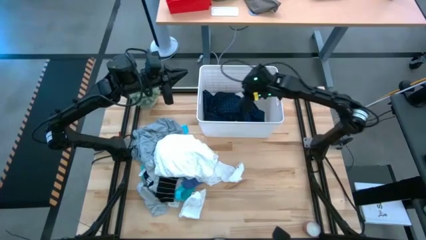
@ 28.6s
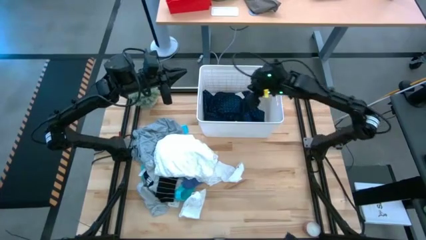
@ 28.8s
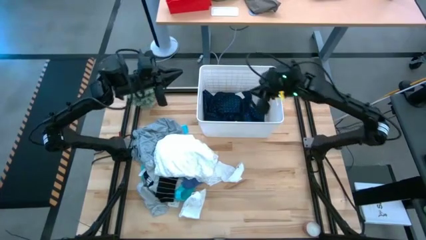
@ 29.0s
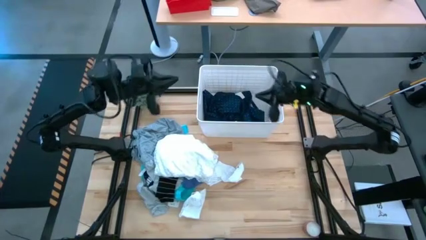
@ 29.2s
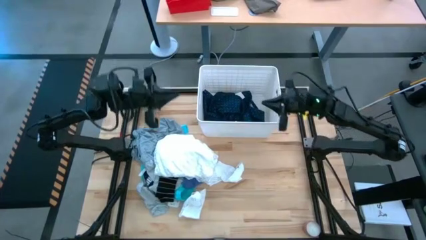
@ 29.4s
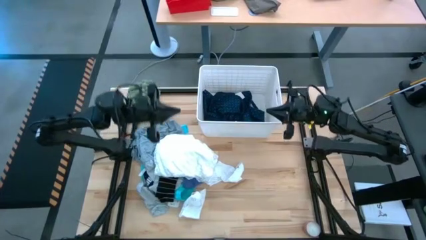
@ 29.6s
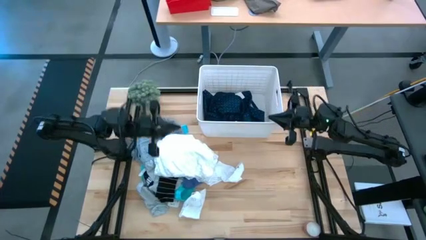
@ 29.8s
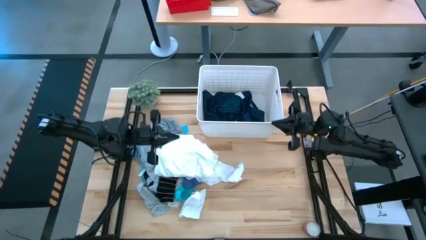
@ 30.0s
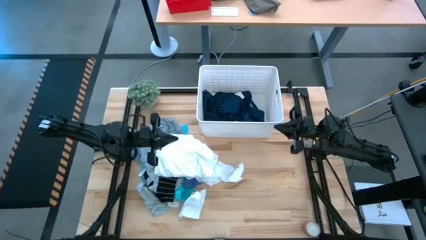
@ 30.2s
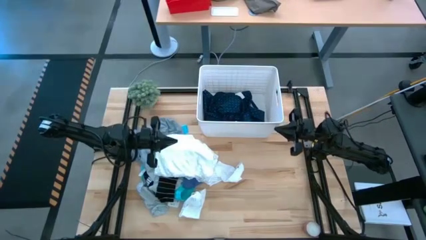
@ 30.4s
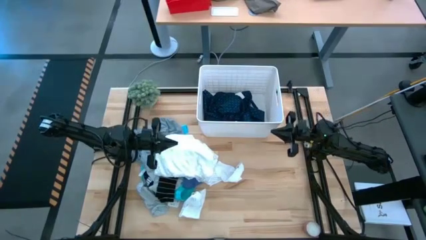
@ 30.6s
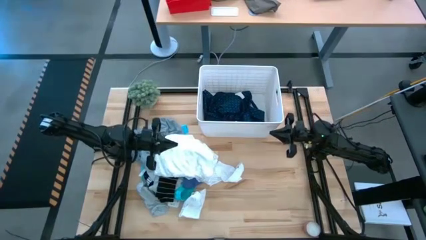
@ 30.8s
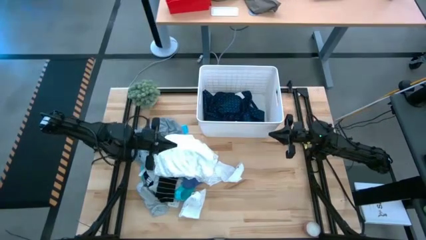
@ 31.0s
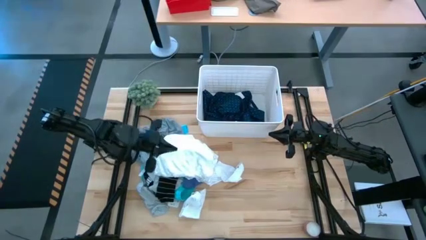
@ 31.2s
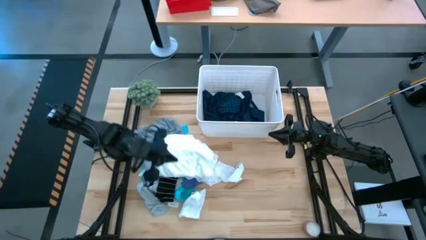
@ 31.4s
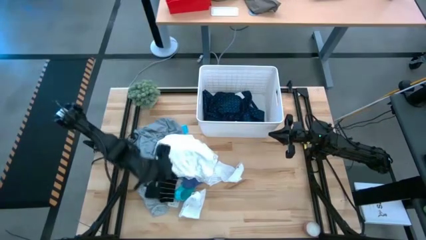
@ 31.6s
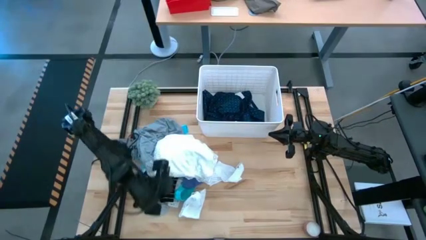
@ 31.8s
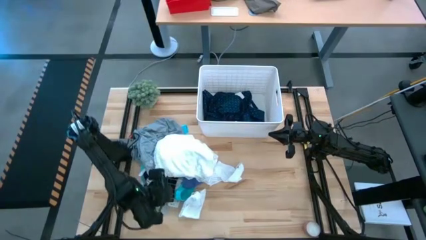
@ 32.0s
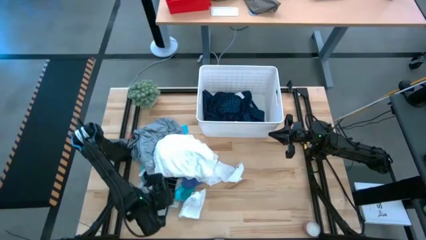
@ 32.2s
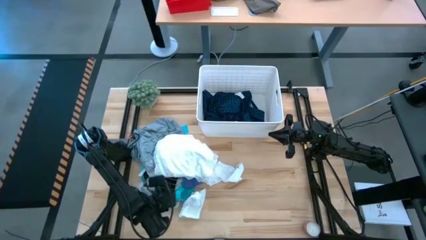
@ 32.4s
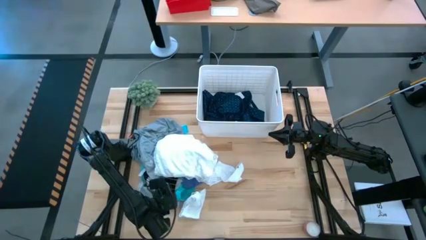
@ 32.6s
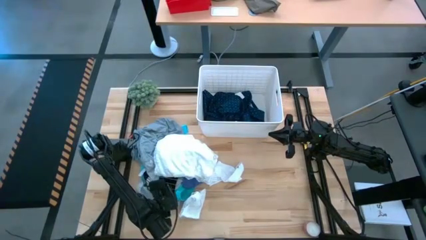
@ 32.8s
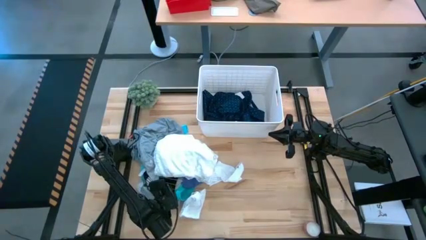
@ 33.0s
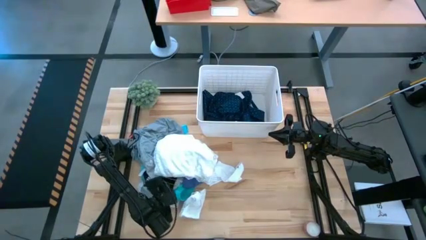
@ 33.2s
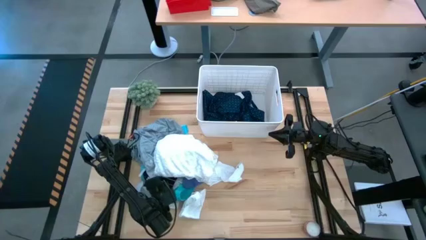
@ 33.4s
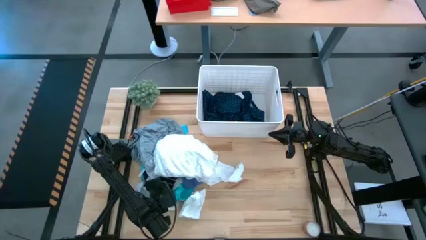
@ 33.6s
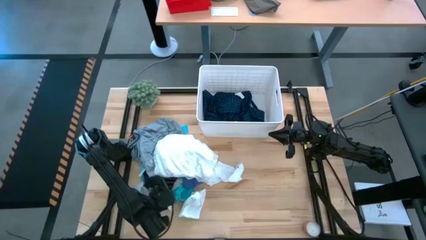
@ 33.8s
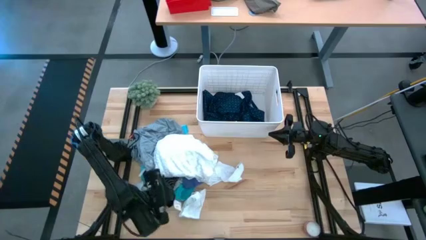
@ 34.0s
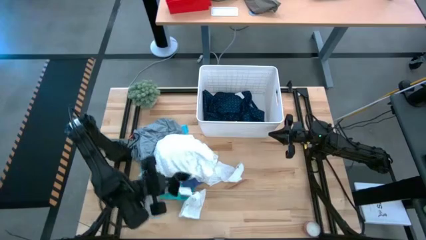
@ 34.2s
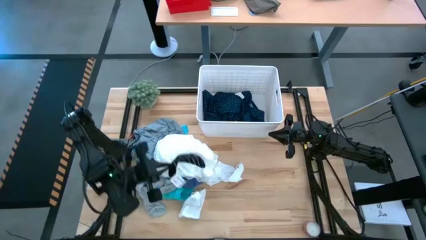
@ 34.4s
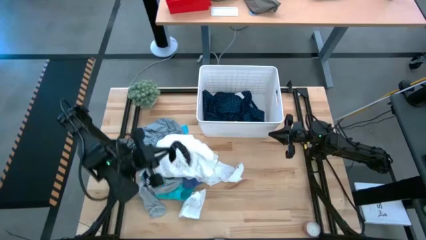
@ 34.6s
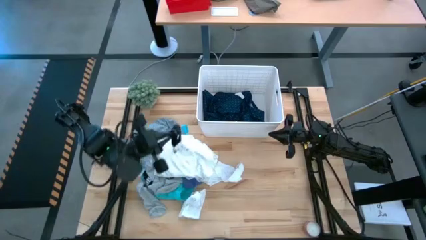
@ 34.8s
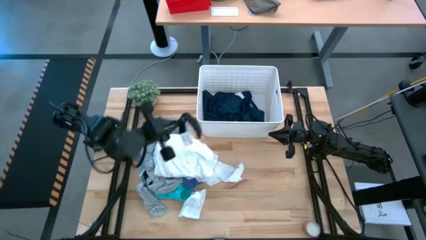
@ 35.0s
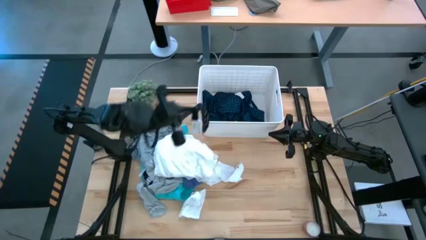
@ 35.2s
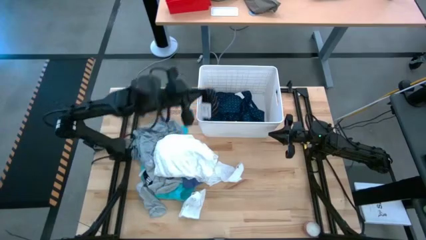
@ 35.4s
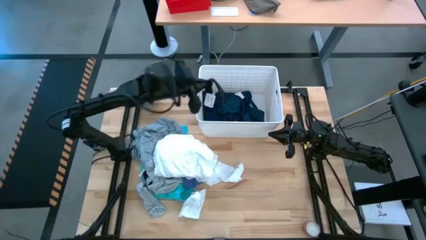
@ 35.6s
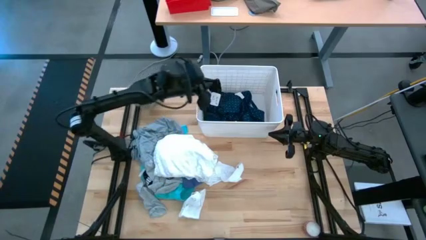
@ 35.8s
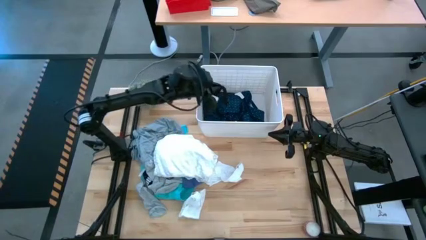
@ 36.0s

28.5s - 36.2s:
Task: Sort clothes
Put the black socks into the white bin

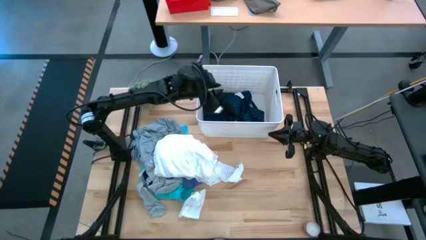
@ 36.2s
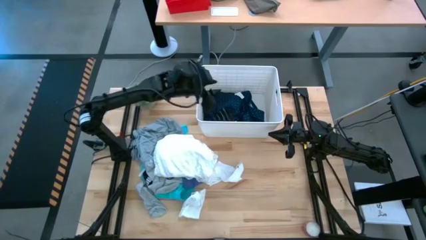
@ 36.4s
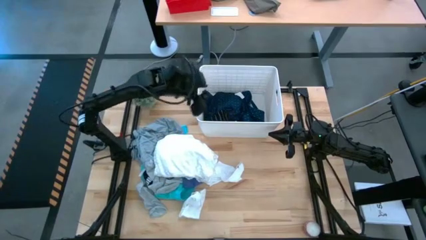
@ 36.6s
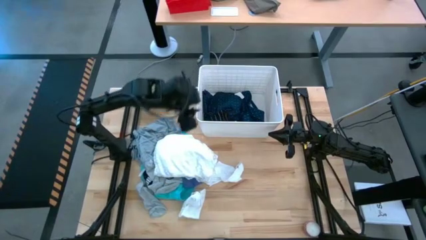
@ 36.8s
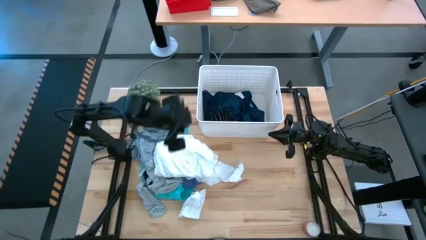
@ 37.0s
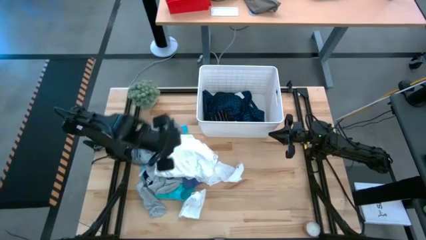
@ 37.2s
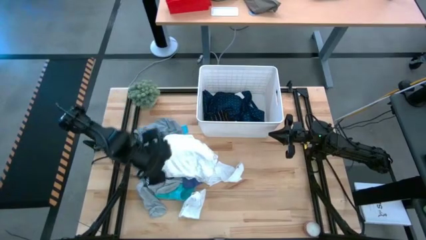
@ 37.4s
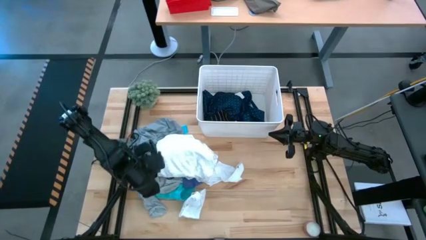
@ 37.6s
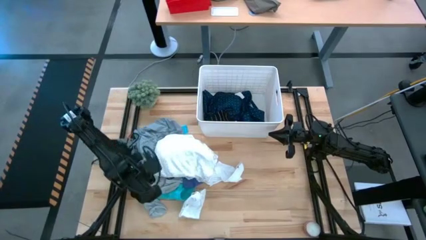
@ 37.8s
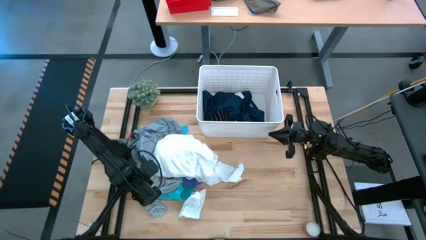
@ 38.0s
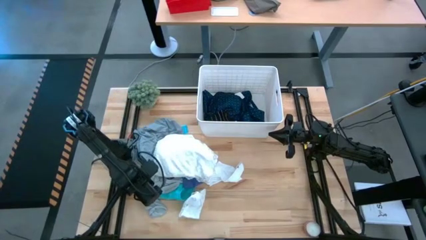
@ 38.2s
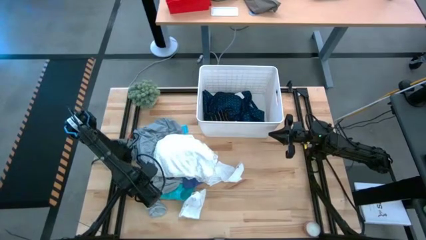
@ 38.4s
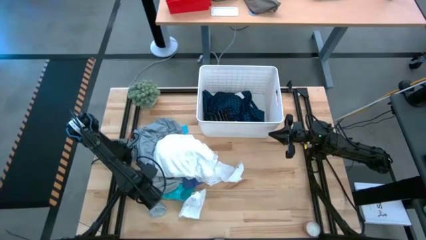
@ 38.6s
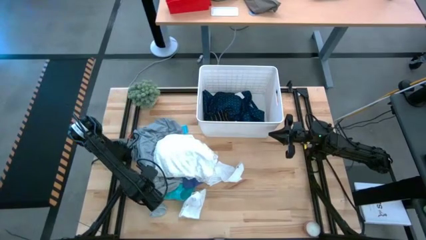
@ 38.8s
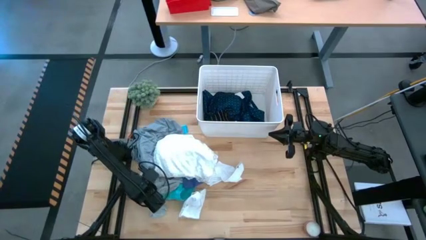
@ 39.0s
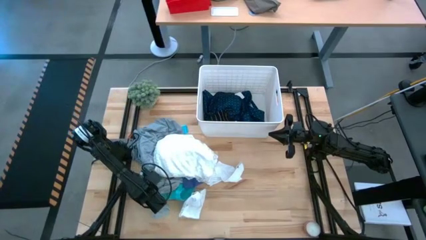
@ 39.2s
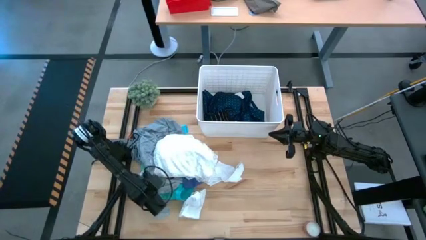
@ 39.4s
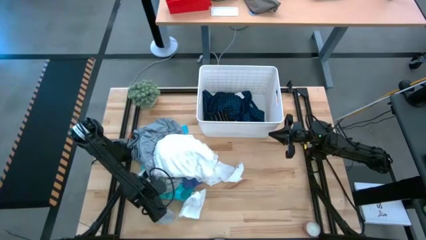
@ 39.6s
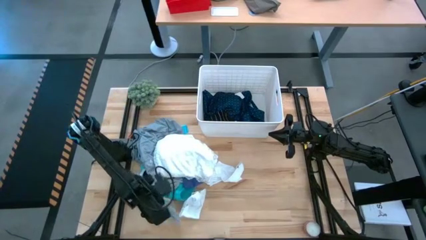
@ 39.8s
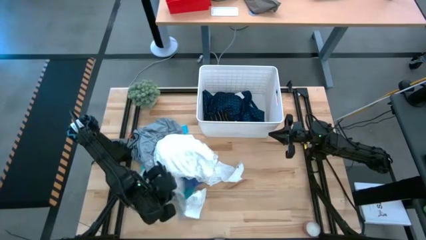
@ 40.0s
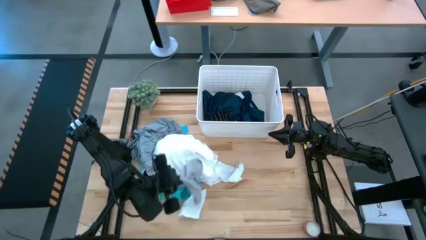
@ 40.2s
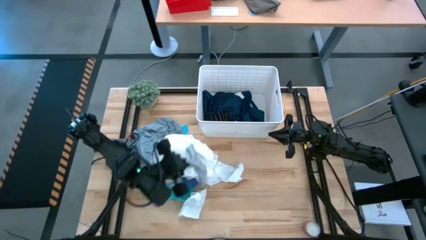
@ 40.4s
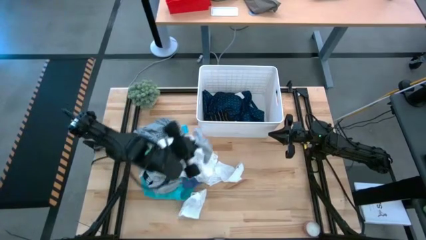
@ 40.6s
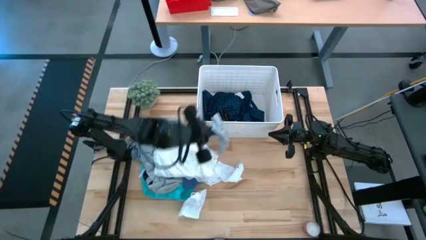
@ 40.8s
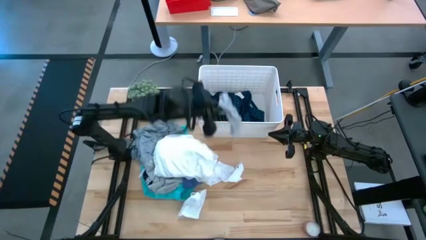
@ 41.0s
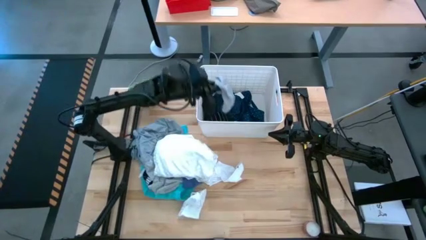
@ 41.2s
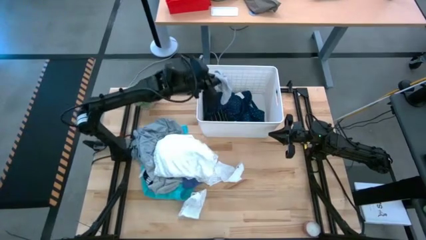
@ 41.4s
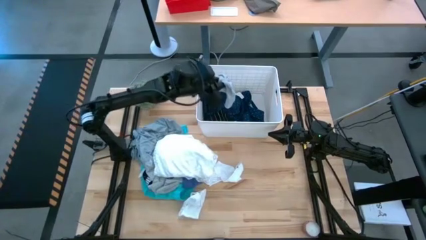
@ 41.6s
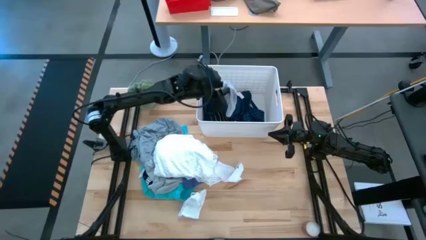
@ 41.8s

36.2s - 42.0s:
Put the gray socks into the white bin

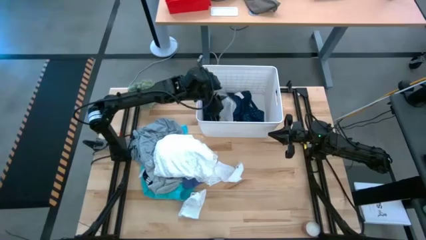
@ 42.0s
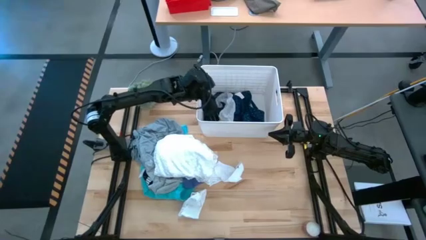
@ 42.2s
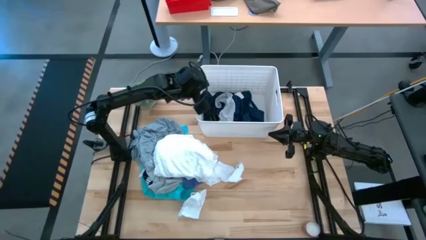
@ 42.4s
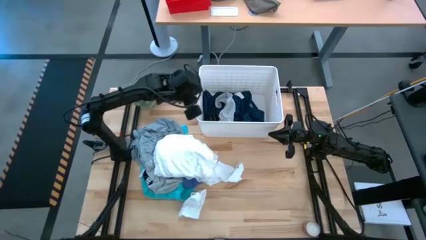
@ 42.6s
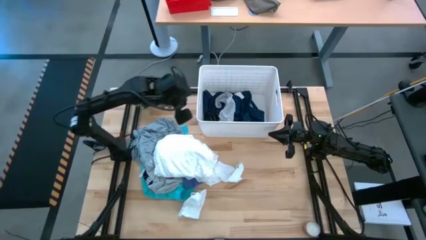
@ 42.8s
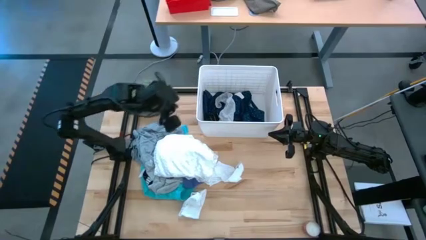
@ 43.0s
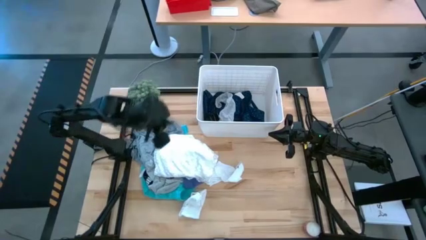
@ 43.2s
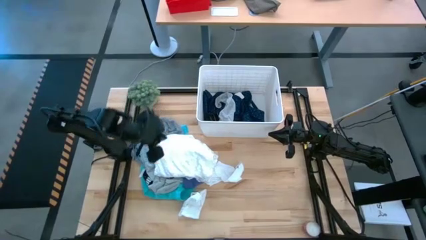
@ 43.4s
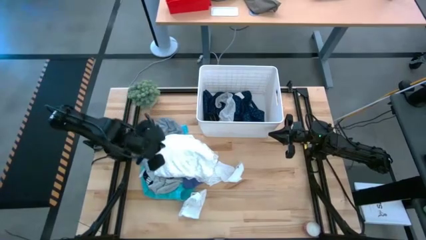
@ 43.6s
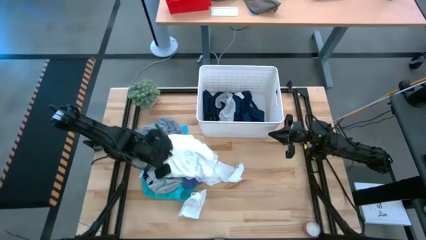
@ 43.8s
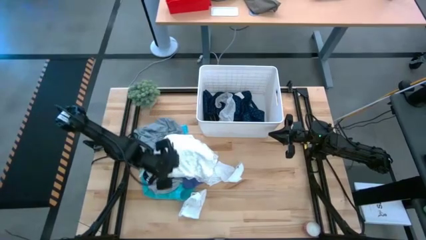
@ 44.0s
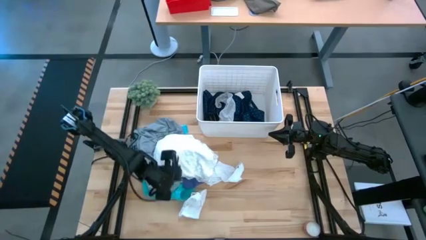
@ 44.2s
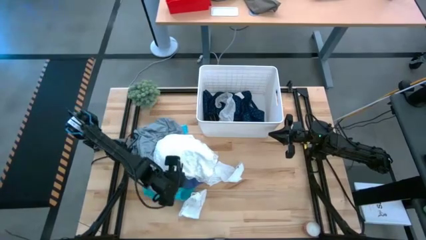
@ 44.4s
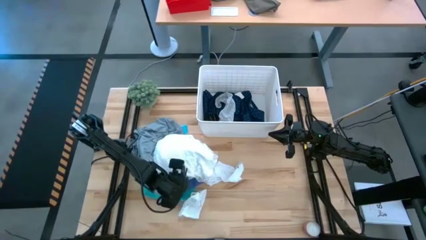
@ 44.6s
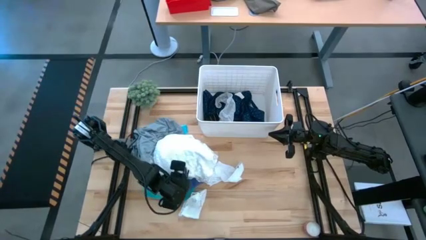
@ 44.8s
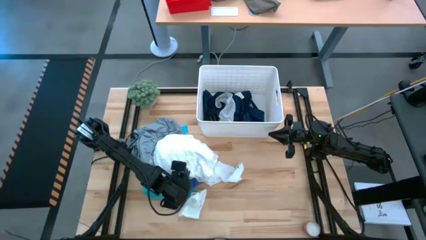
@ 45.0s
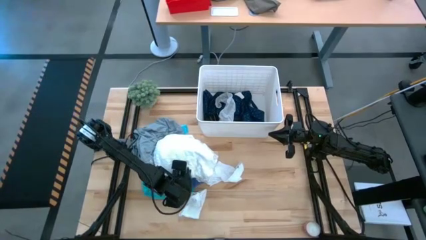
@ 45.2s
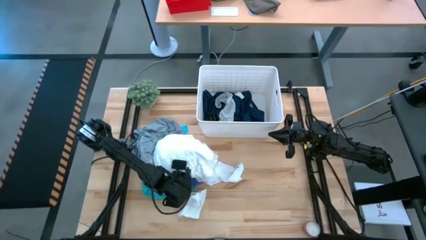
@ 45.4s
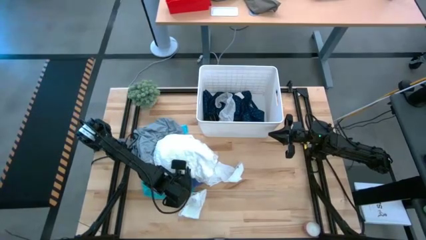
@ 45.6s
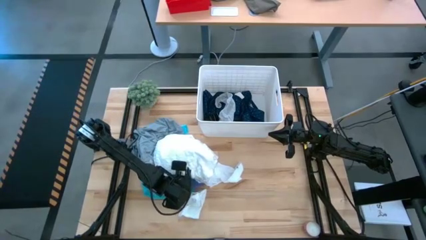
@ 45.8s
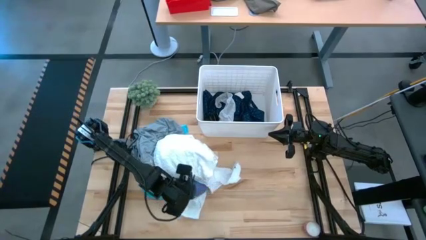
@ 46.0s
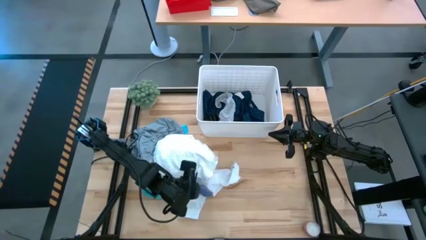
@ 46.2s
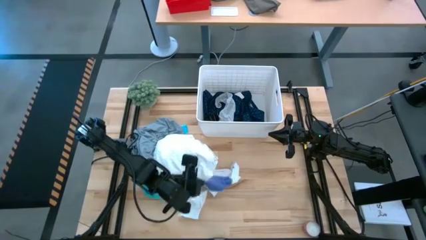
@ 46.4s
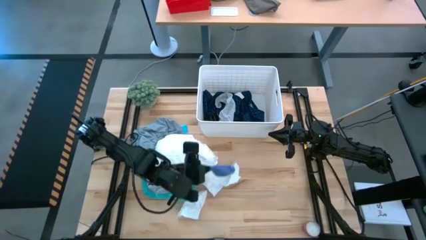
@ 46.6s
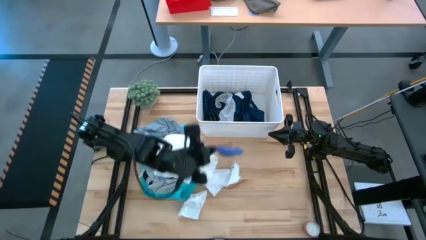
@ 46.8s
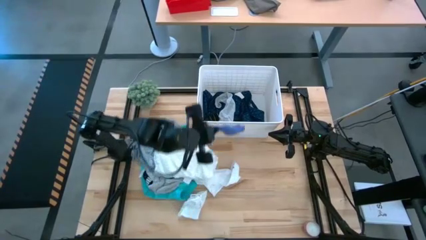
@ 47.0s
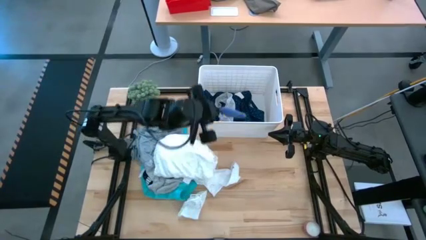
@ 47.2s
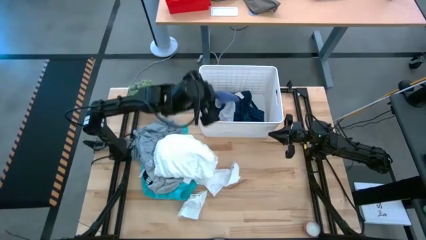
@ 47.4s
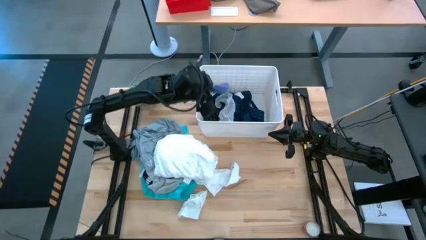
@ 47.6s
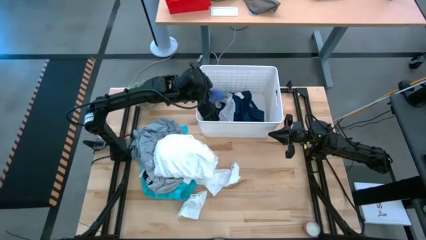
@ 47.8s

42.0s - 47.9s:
Put the blue socks into the white bin
